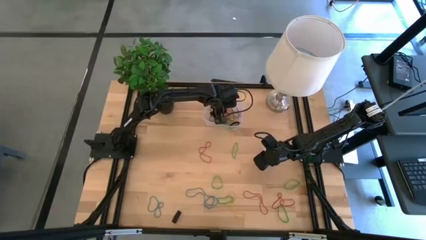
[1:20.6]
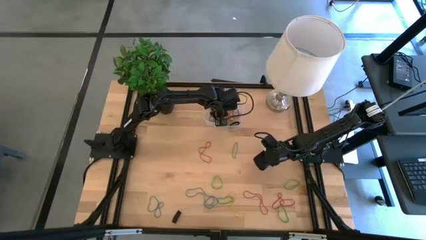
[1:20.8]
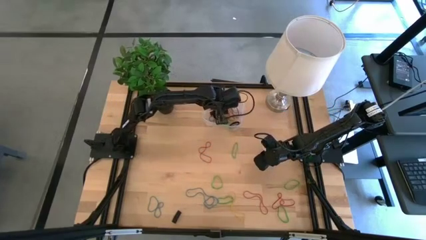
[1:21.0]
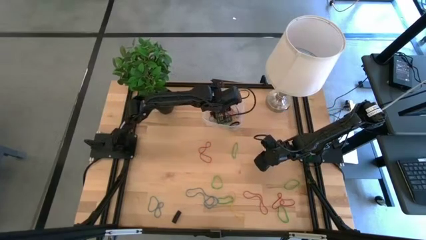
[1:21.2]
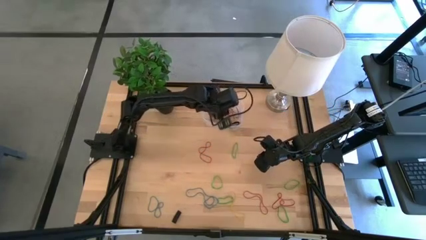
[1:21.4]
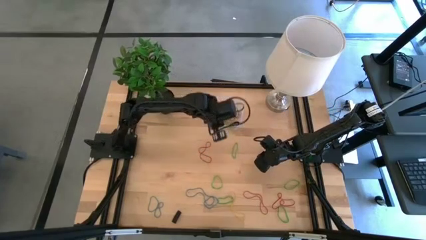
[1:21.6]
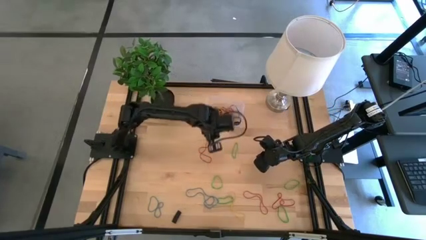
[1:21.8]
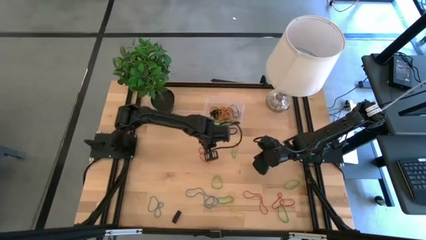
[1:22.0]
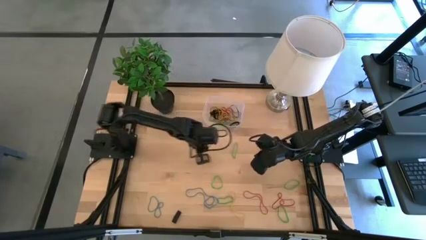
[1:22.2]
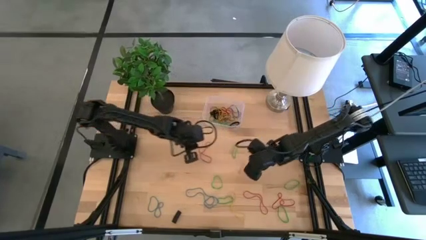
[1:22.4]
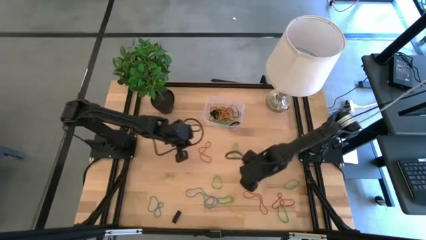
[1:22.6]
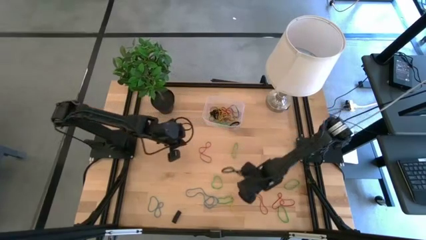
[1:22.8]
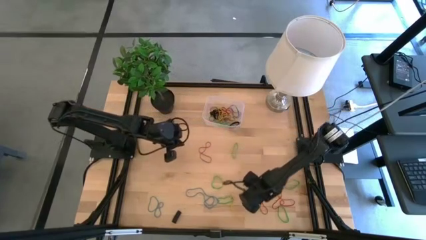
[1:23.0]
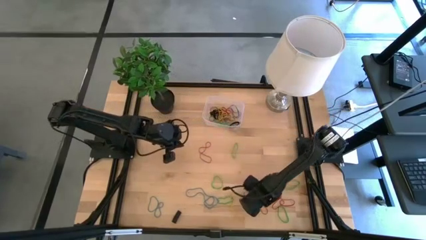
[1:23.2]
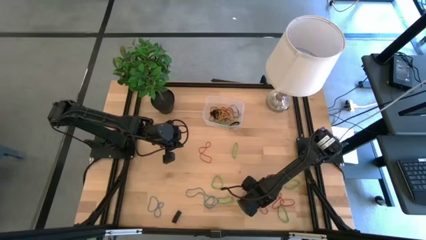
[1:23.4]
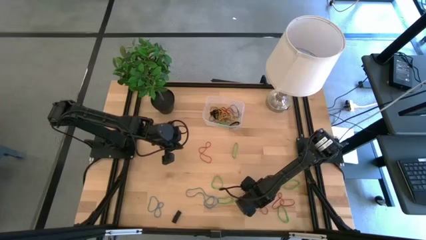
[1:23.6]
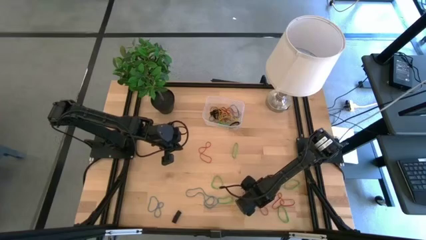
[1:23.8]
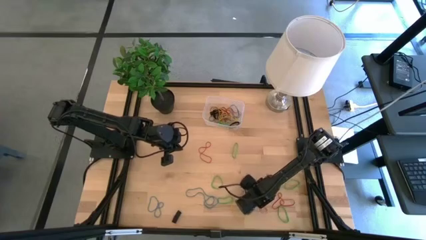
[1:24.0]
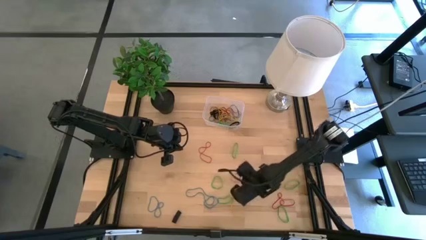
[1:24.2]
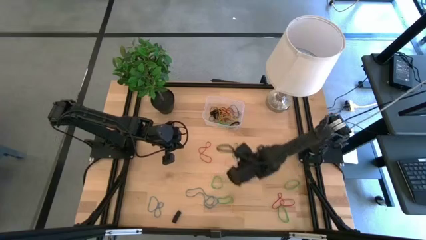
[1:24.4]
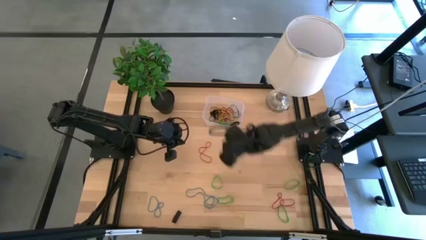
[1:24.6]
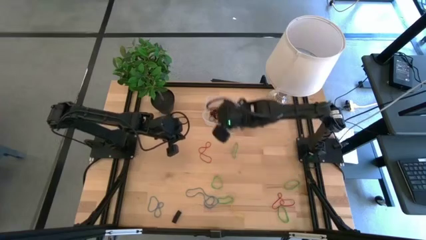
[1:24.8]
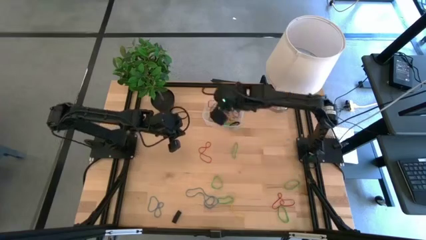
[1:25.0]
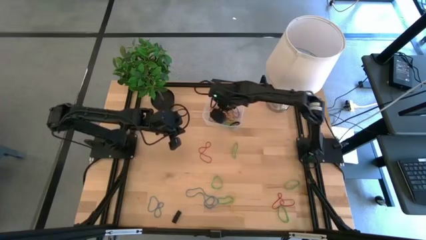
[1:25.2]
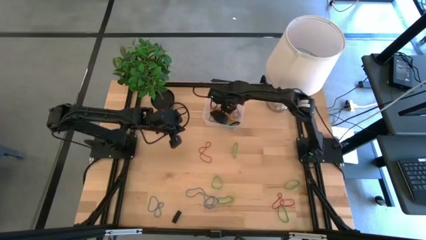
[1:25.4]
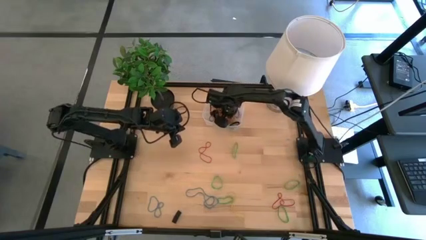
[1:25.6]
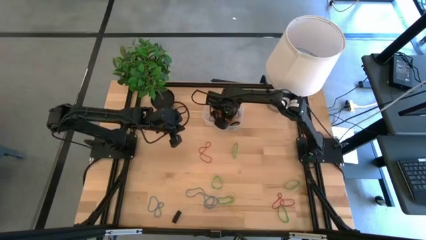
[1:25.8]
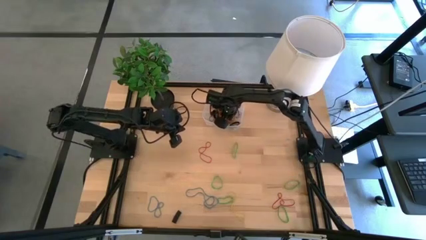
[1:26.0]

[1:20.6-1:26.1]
Task: Pick and place rubber bands into bin
Put the red rubber band into the transparent bin

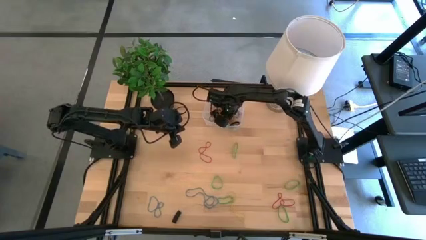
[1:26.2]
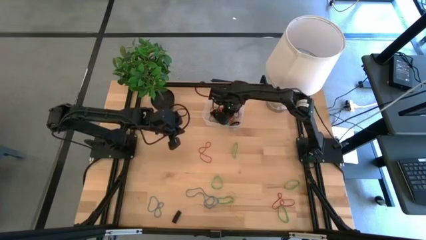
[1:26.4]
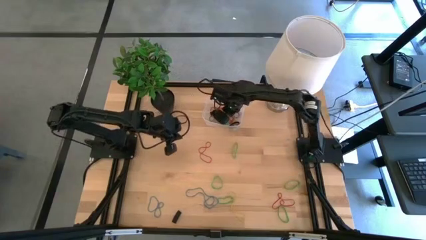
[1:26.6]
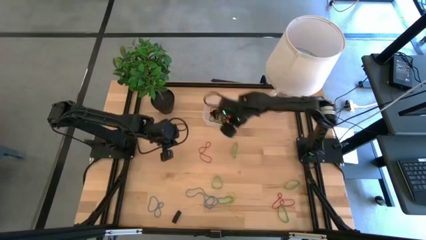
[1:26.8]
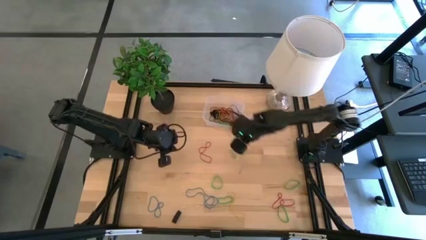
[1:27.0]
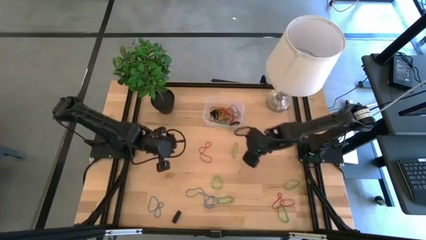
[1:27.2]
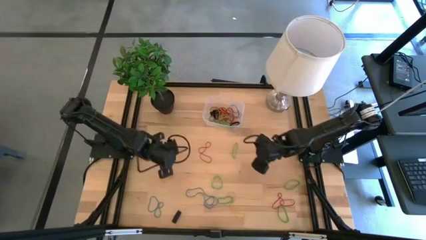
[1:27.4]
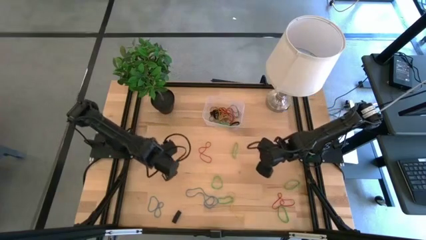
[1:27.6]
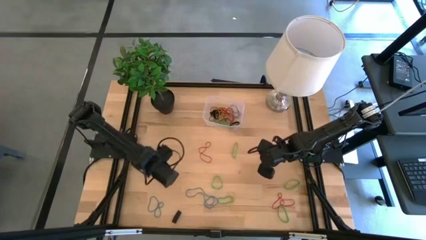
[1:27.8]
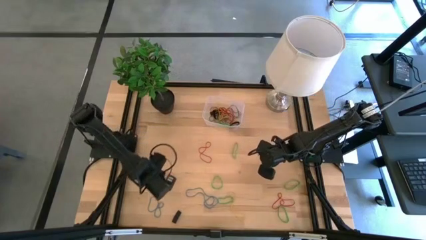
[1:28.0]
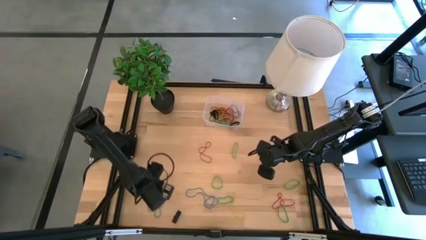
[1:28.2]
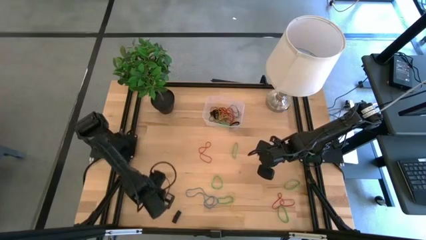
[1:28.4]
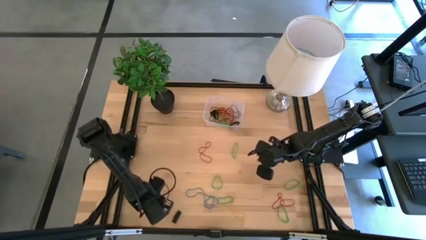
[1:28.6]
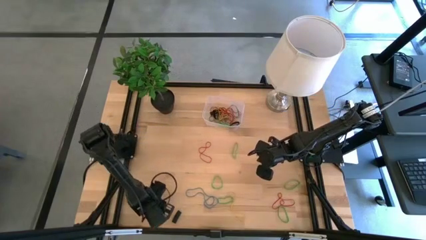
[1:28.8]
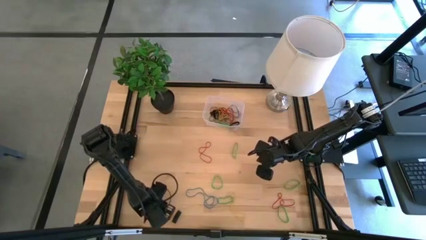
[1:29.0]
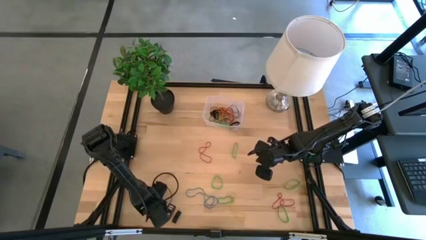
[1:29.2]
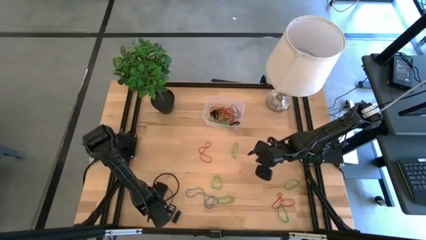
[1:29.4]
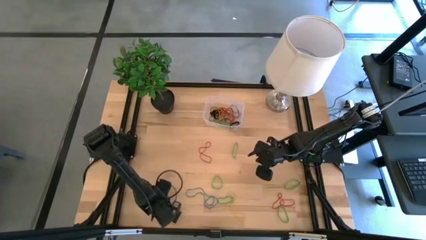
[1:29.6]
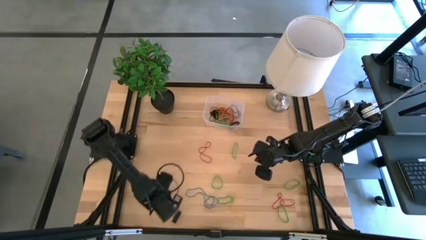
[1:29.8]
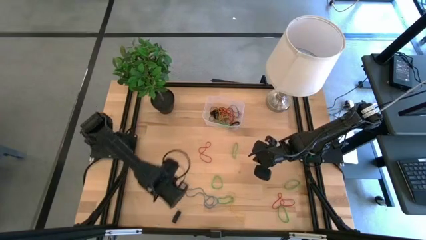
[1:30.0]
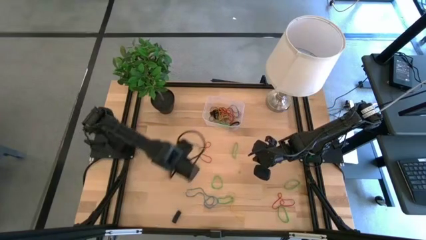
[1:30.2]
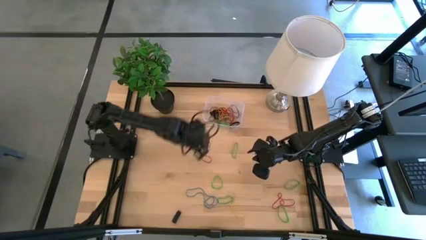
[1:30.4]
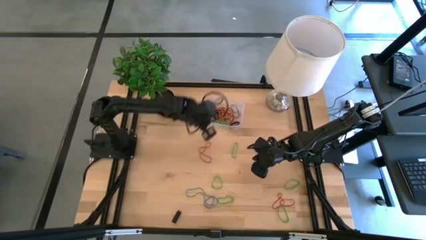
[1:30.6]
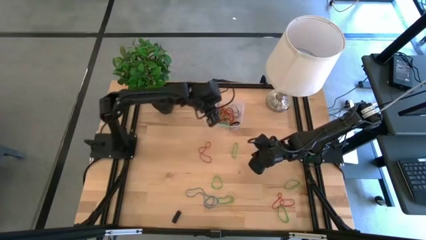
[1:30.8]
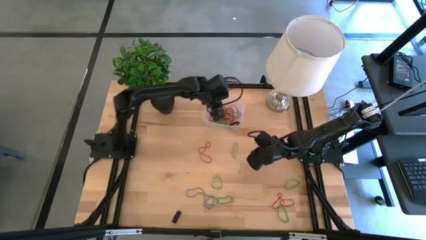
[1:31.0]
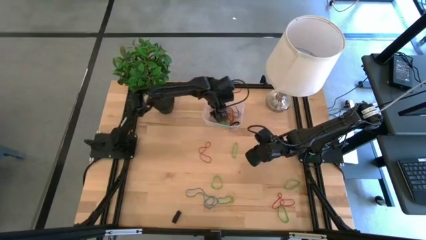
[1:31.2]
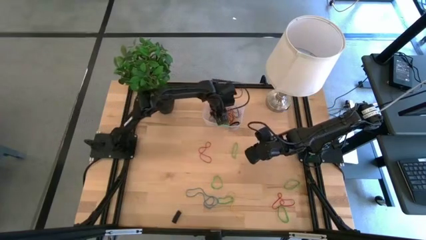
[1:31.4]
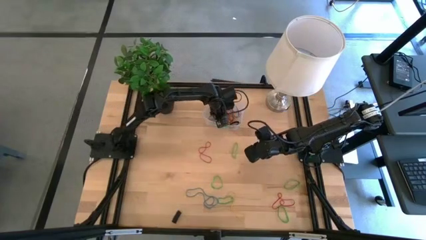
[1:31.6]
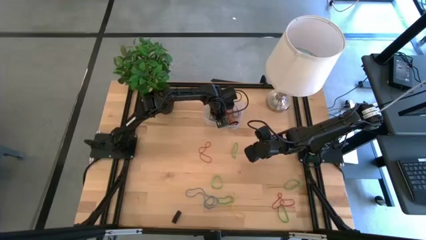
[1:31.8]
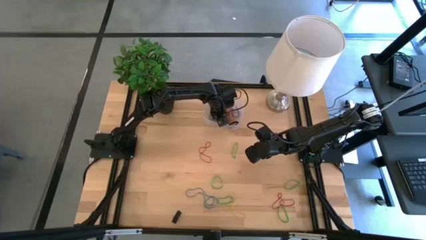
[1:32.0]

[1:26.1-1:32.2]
Put the blue rubber band into the transparent bin

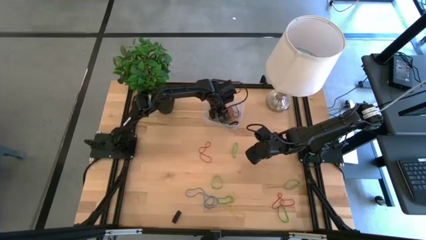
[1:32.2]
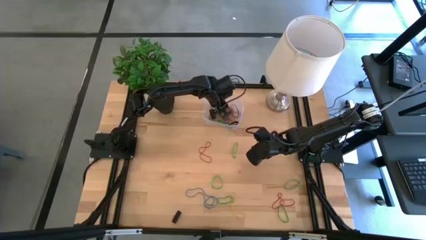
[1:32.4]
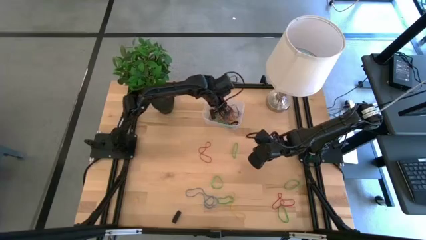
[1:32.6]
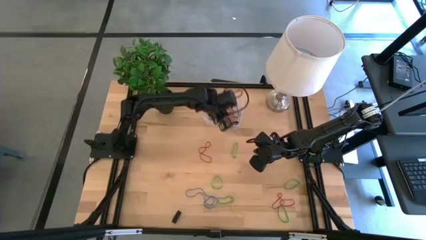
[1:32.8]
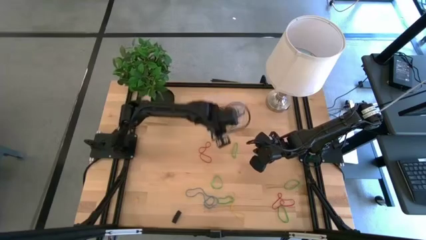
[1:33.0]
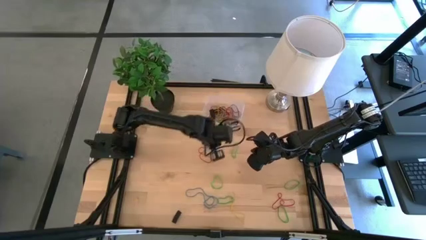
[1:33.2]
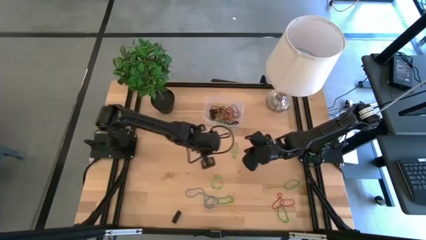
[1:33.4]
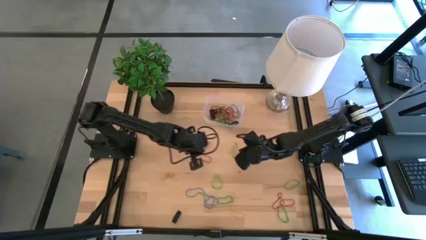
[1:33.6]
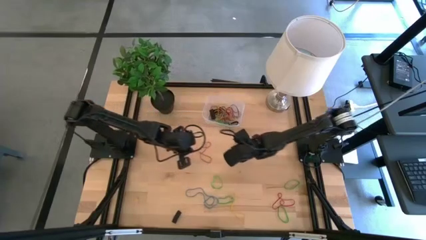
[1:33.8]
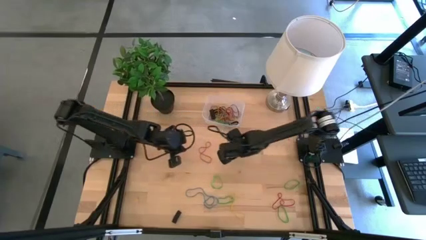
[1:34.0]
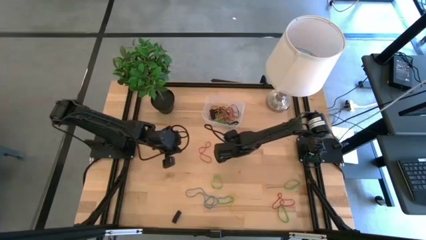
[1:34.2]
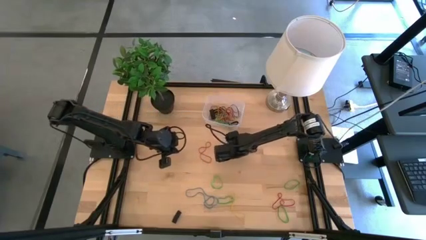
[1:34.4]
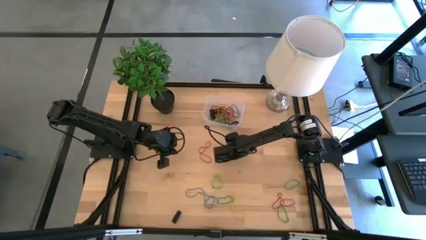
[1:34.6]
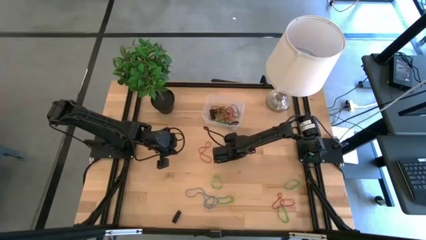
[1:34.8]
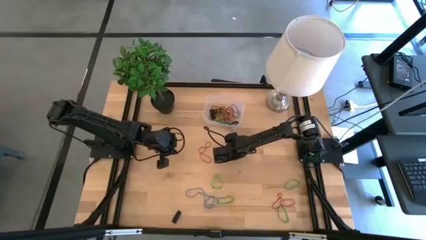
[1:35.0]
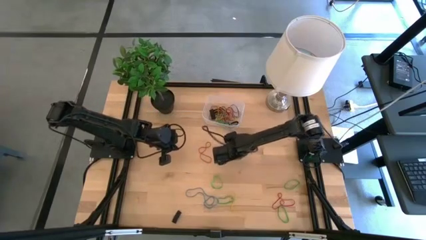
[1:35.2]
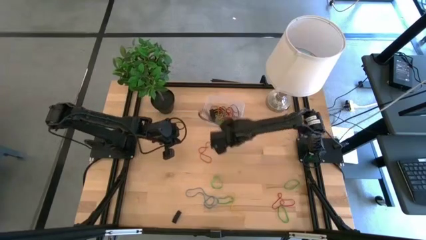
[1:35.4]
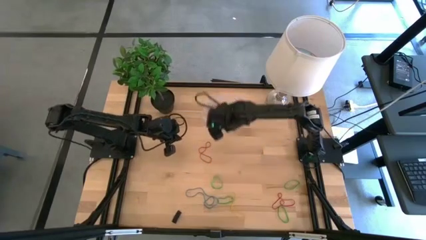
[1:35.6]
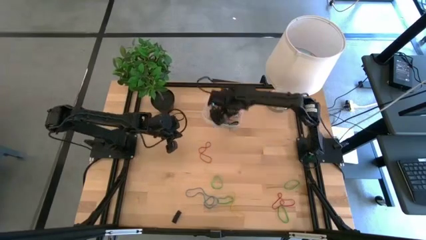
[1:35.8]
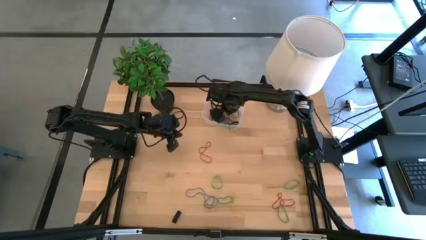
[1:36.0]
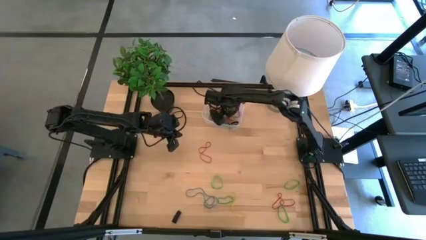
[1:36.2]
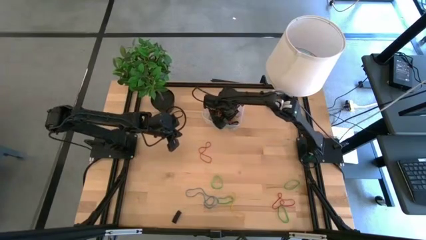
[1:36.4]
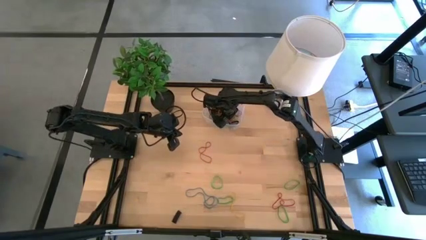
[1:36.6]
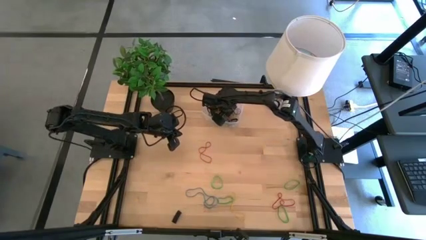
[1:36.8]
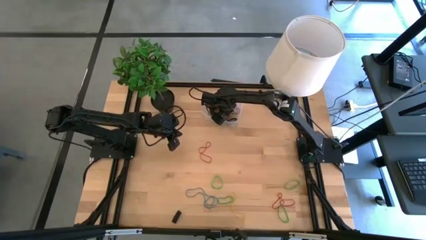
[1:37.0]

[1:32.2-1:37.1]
Put the green rubber band into the transparent bin

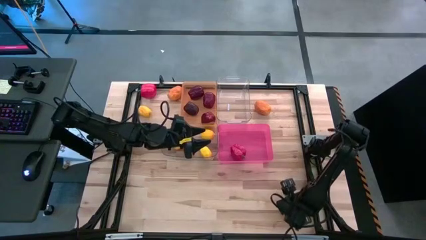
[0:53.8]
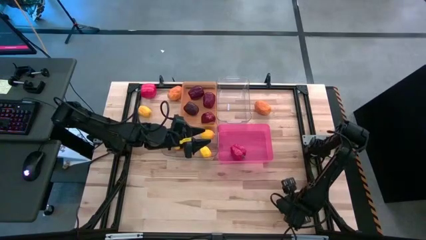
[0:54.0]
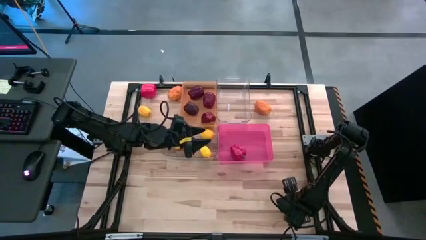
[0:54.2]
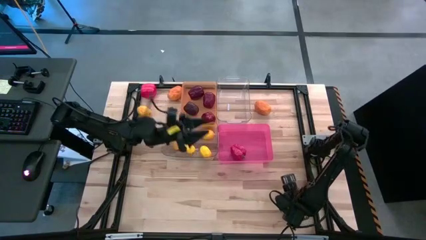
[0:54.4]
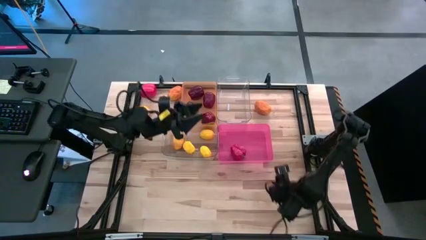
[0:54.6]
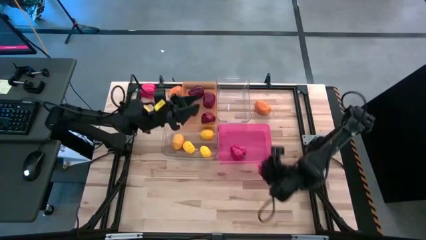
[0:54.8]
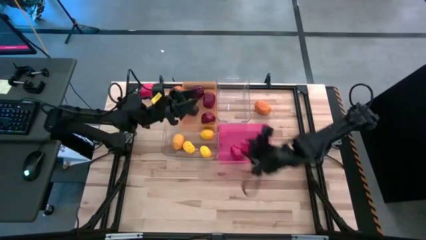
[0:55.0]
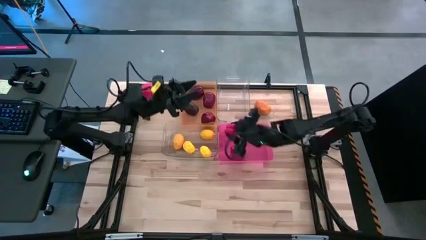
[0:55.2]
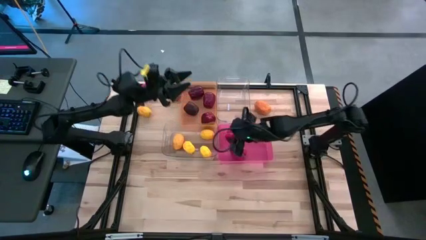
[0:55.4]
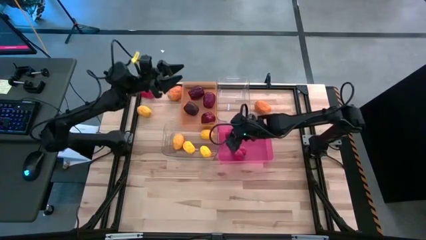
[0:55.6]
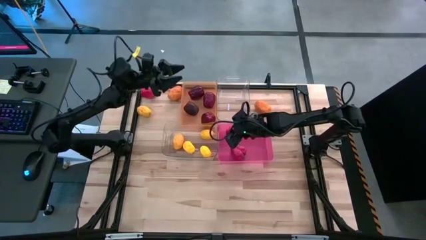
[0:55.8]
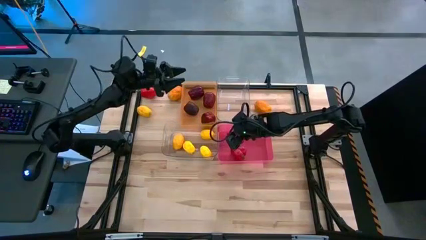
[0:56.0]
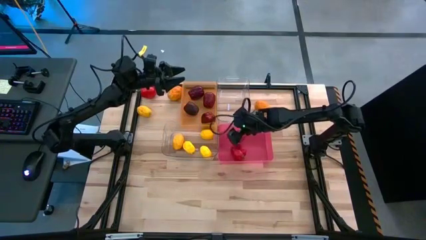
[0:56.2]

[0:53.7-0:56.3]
Task: Sort produce into baskets
Put the red bell pepper into the red bin
